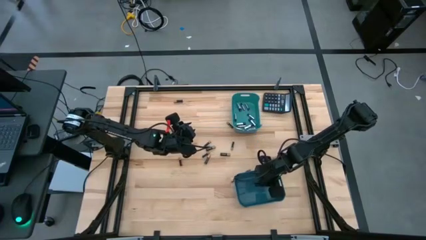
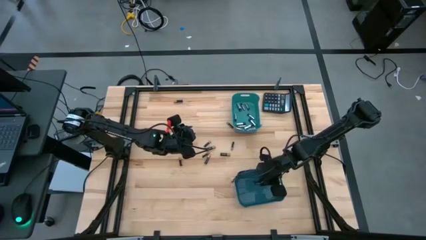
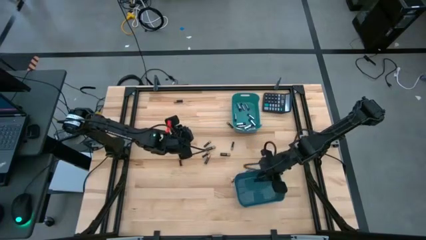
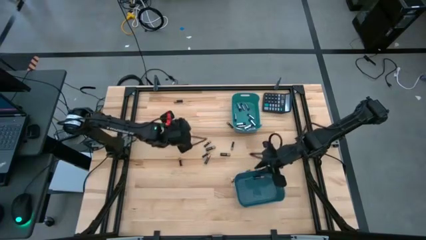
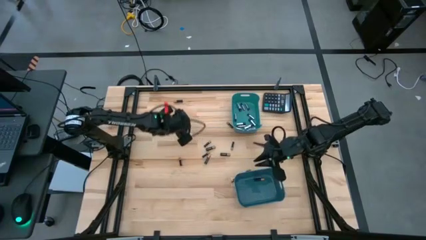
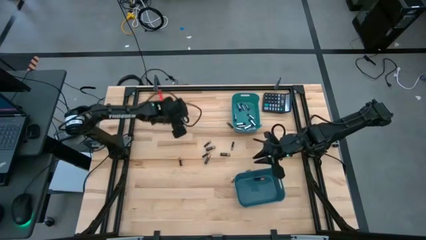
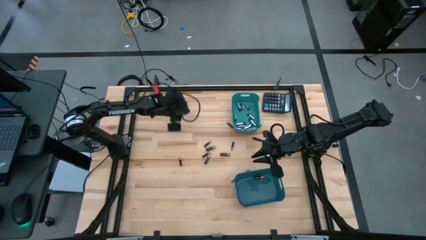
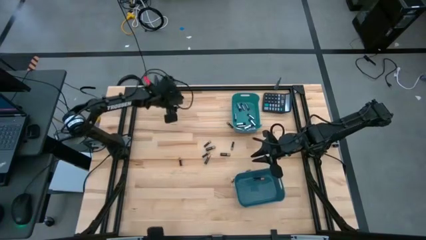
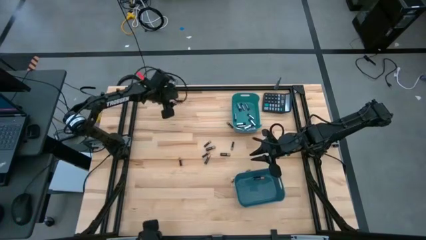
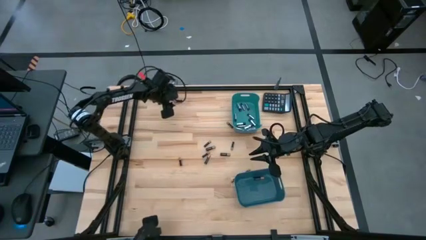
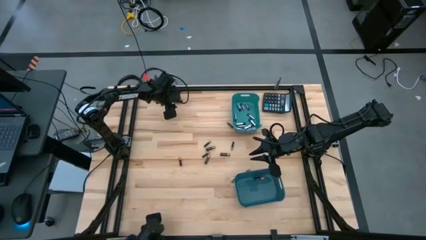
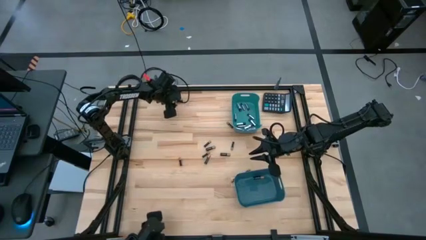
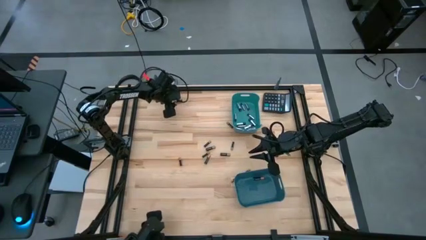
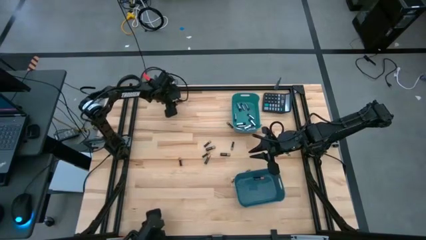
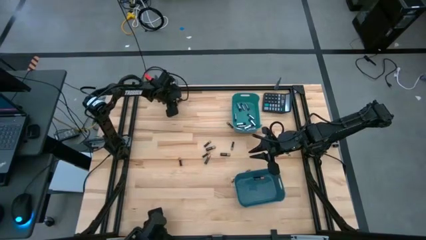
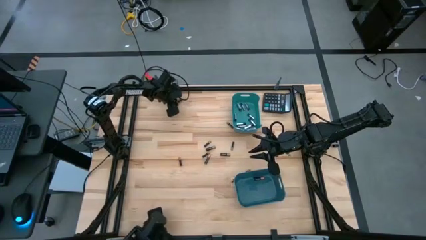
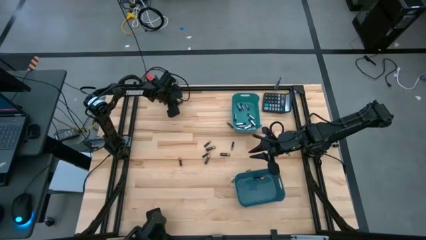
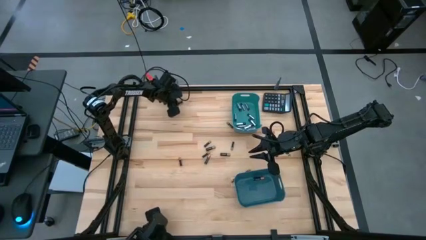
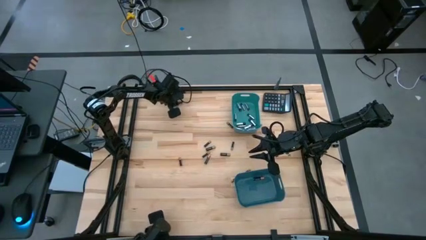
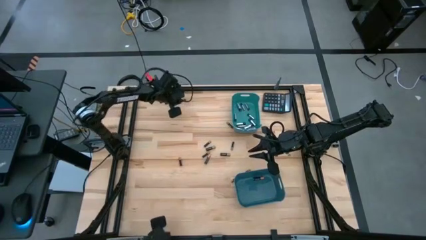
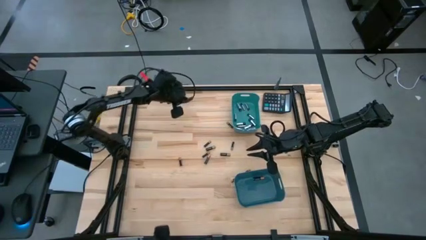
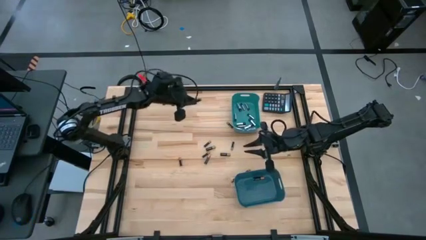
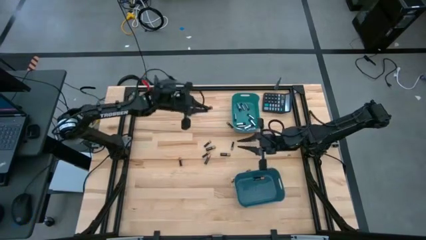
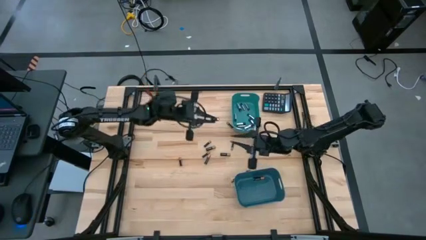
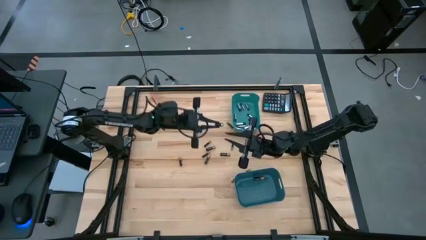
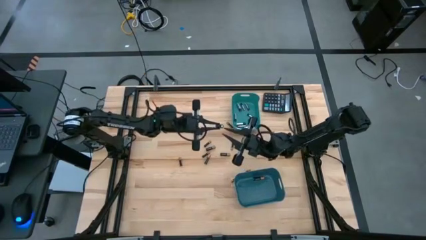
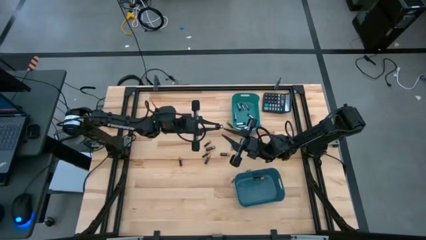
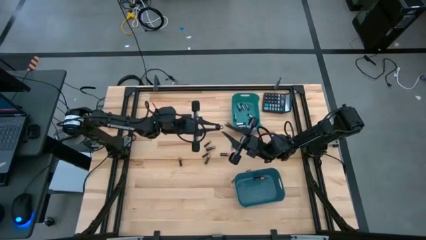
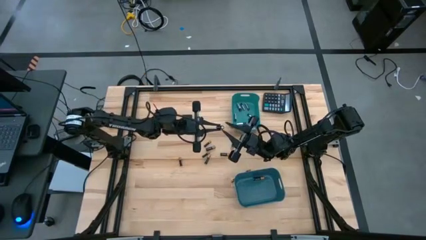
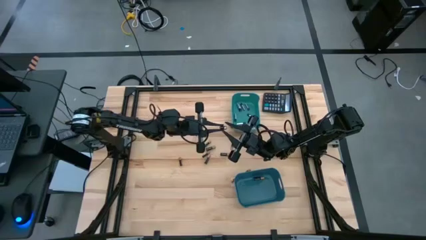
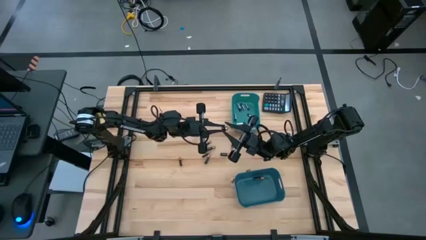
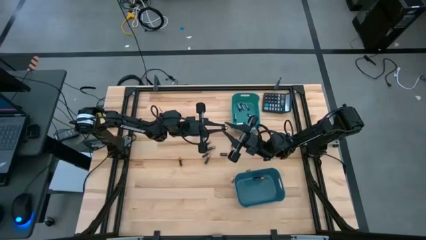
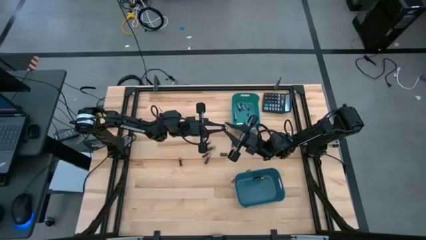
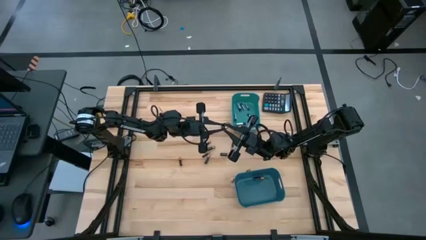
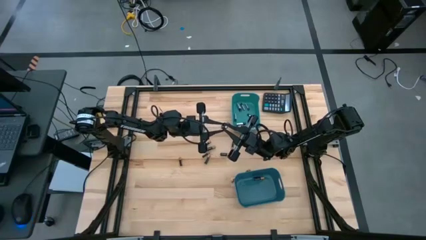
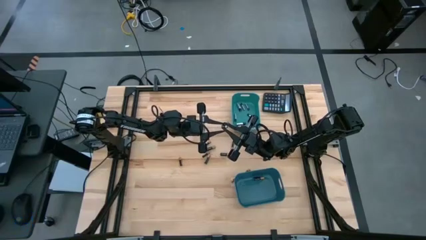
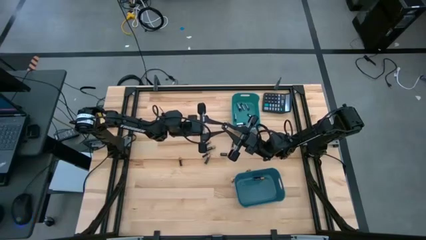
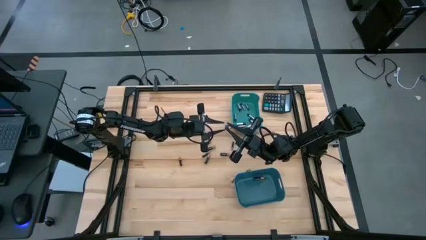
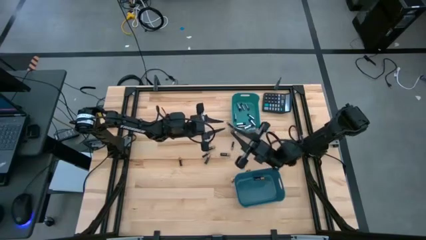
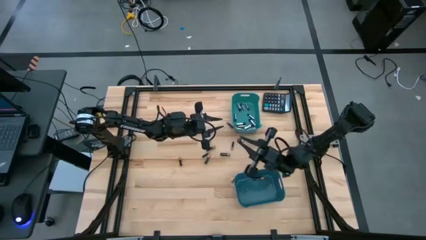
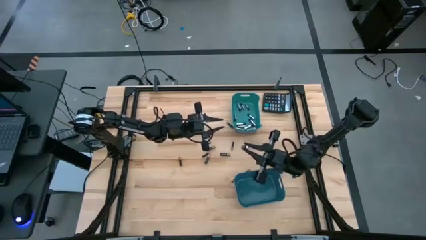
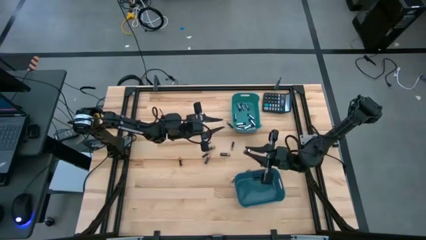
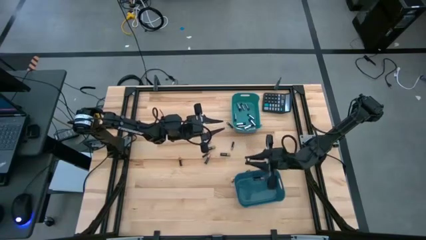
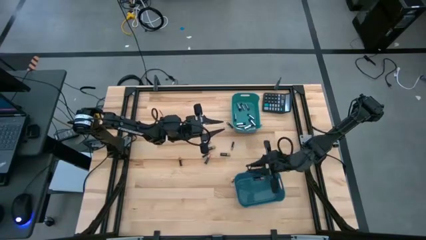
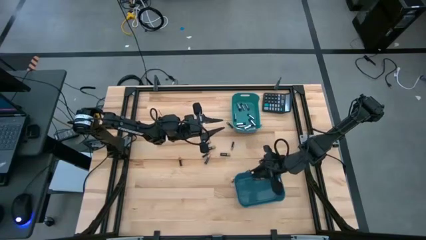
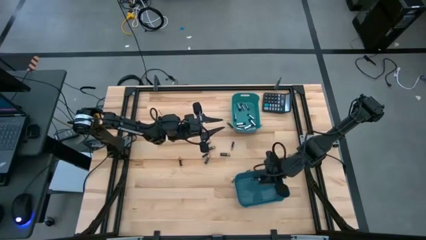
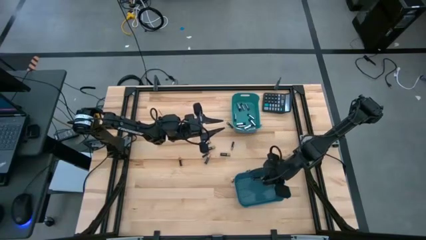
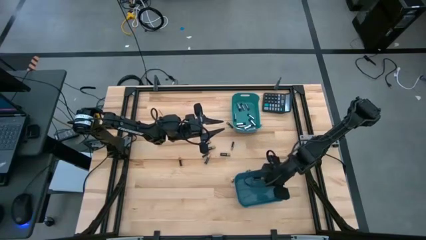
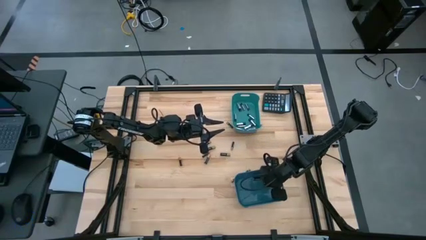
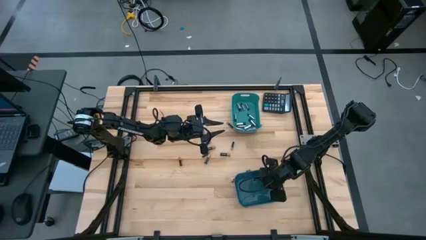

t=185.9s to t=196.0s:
Task: Sort batteries
Put the black battery into the blue bin

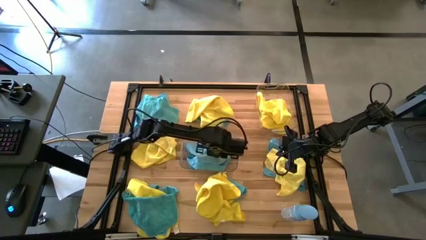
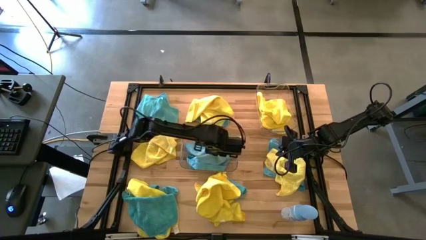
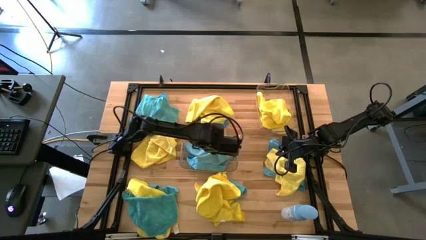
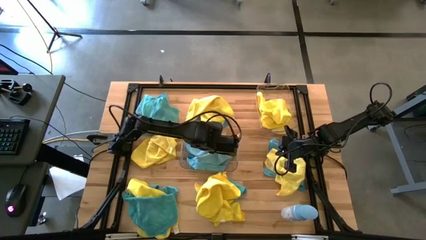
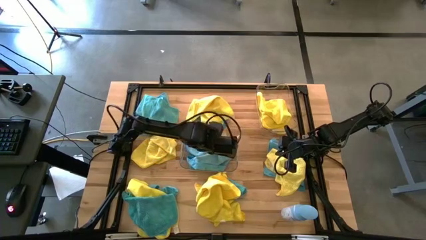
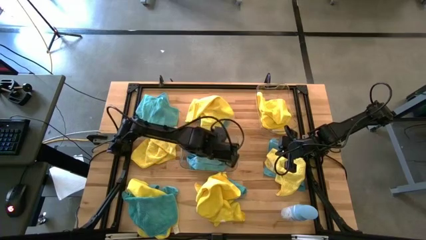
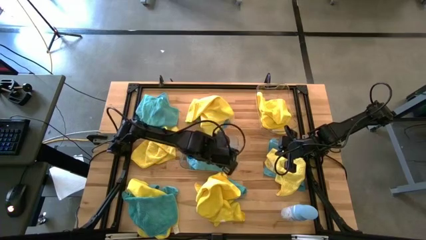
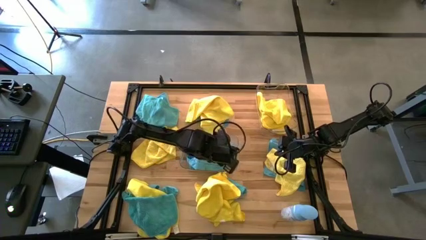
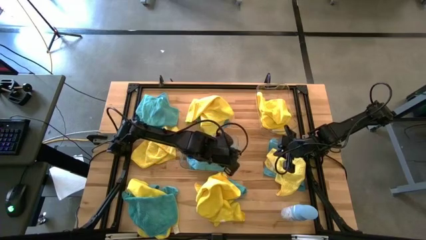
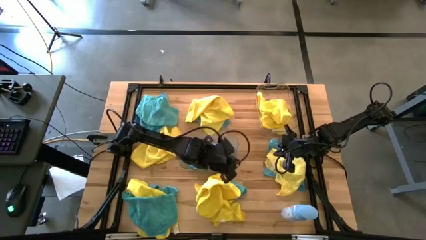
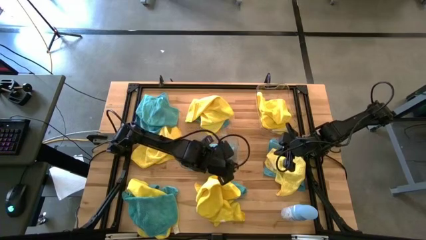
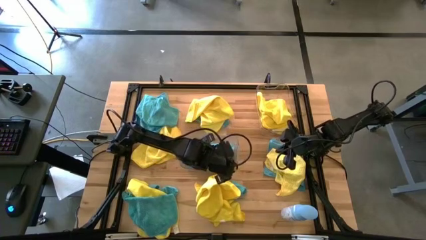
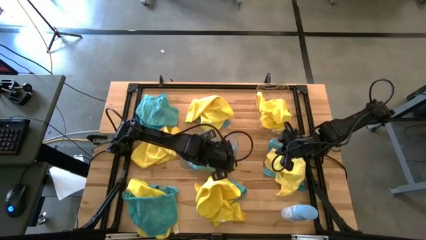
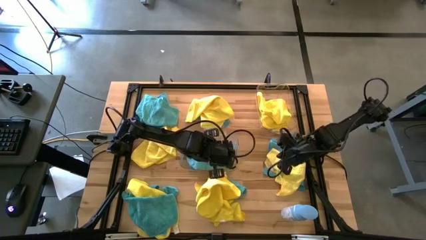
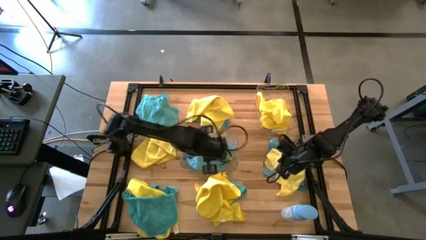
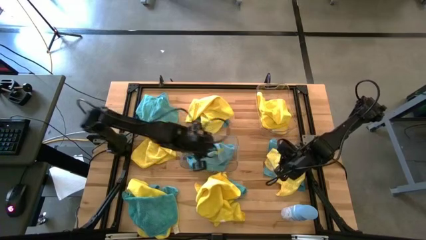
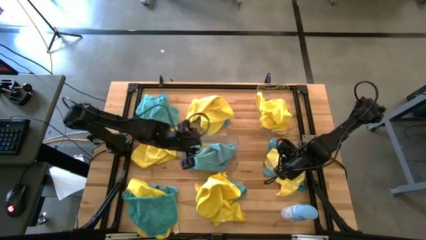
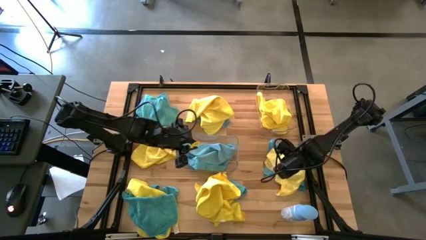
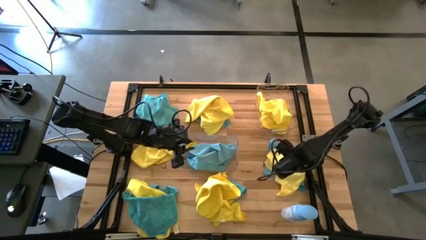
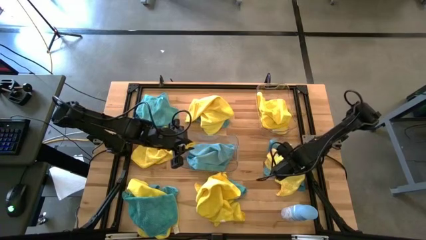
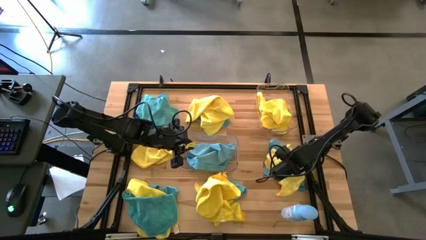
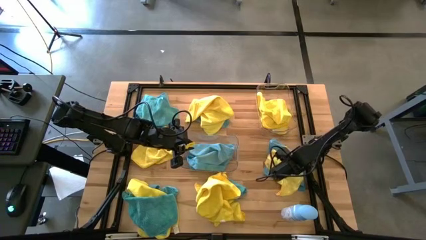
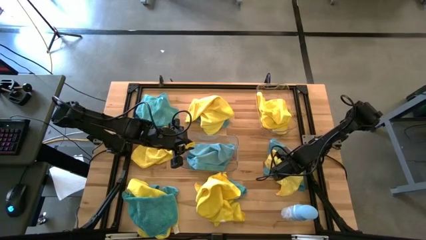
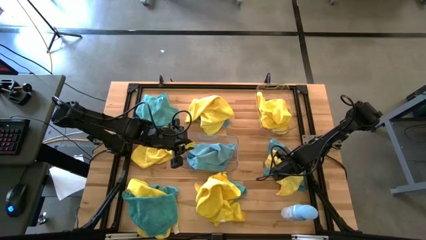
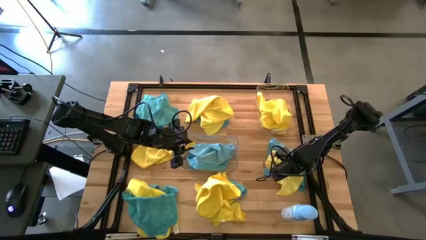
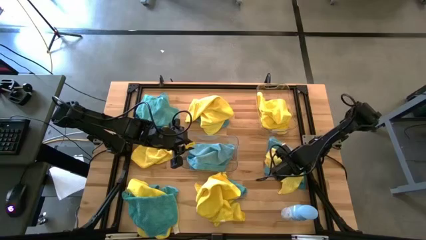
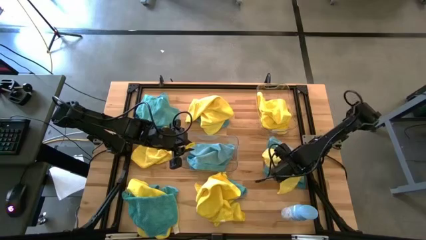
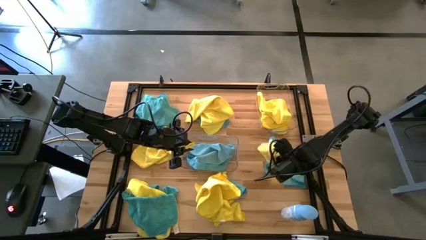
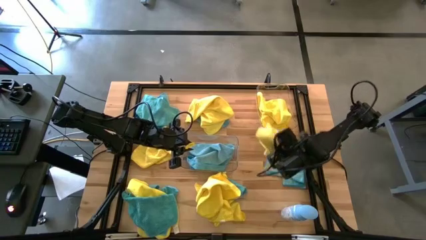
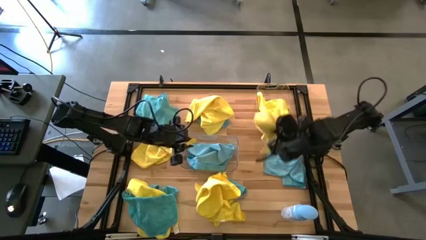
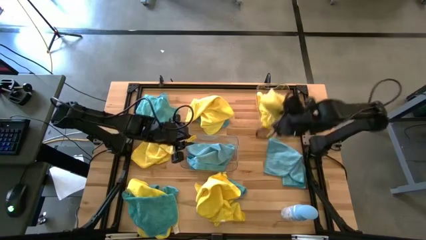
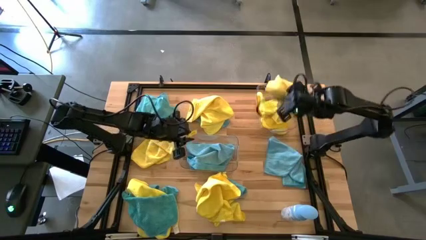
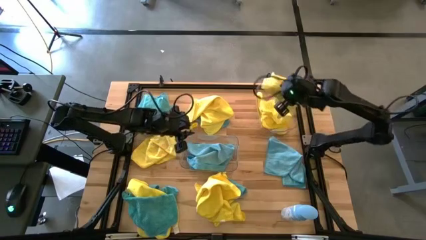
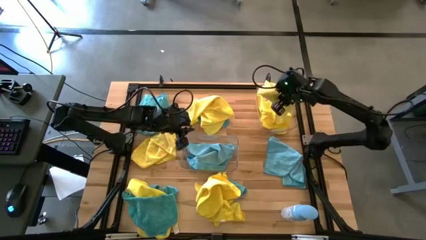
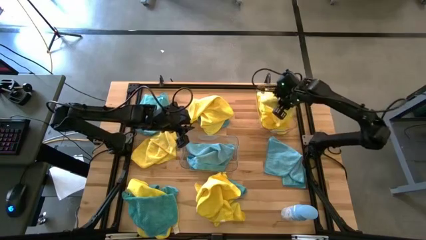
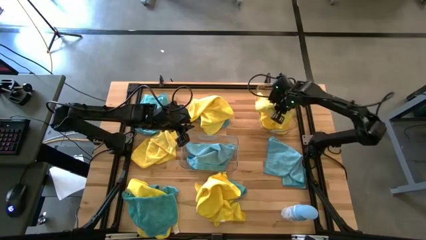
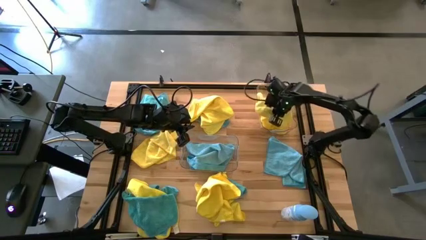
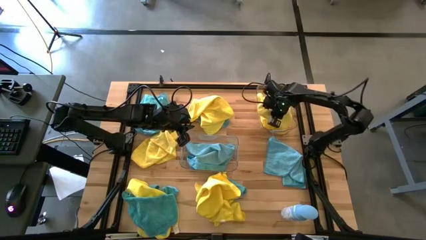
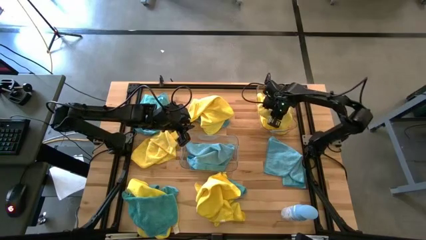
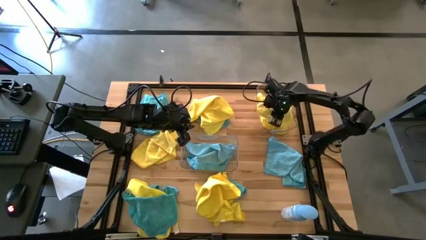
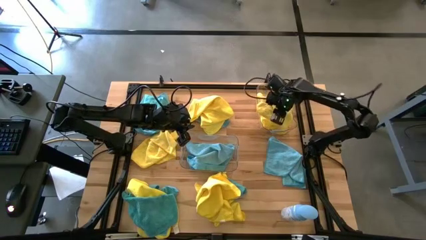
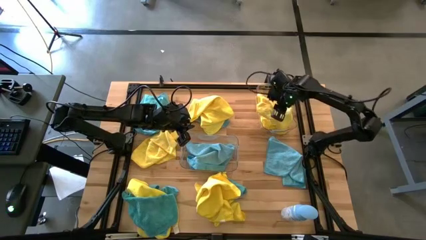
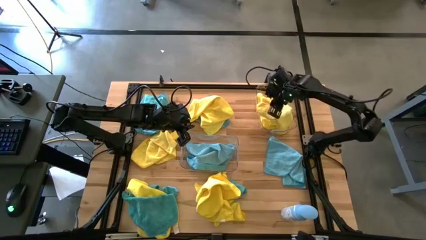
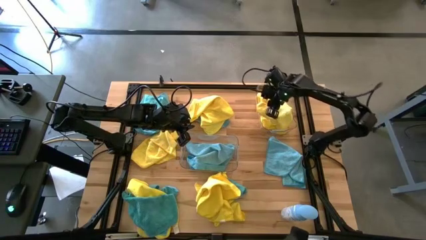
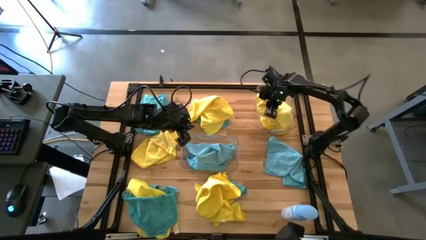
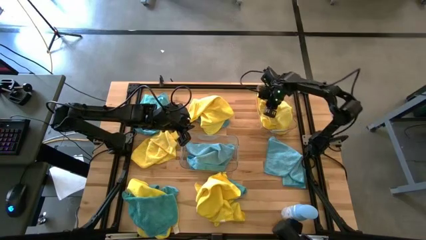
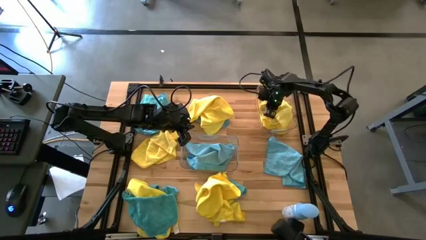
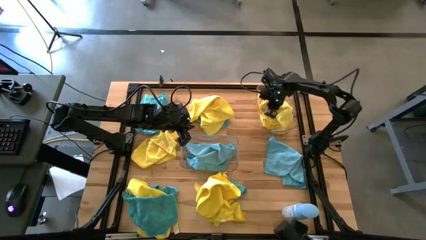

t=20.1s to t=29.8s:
Task: Sort microfiber towel by color & place in baskets
Put the yellow towel into the top transparent bin
